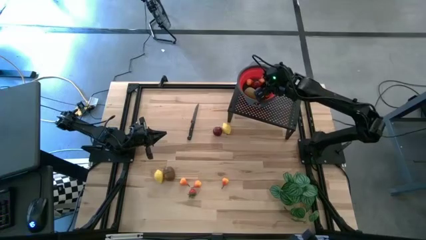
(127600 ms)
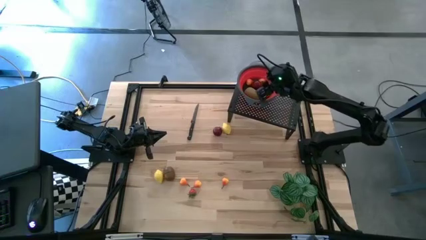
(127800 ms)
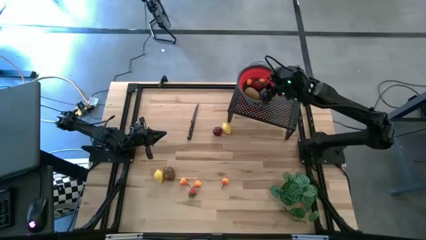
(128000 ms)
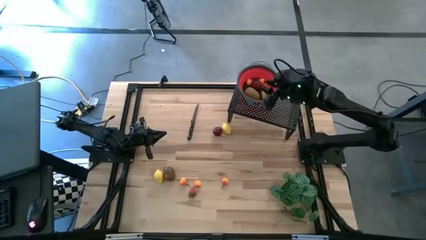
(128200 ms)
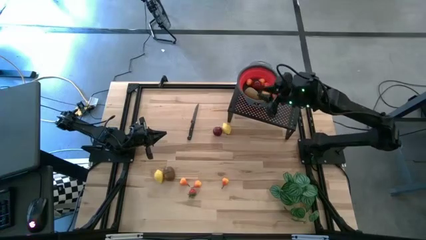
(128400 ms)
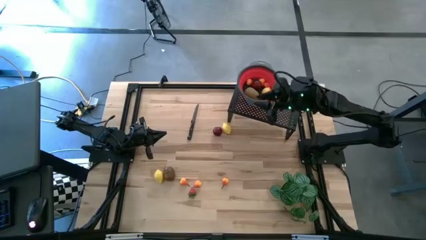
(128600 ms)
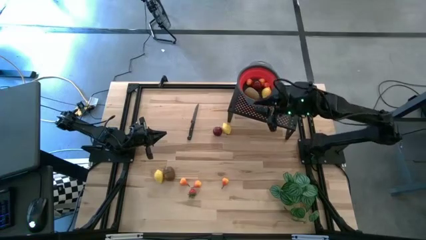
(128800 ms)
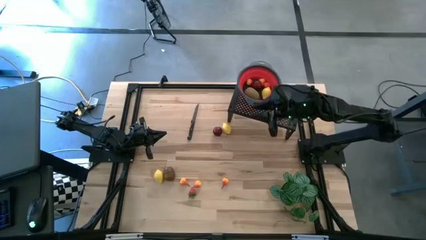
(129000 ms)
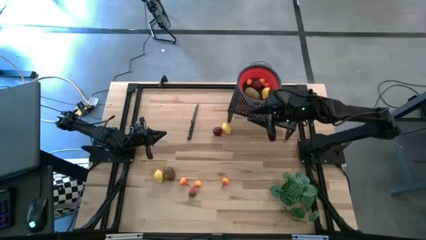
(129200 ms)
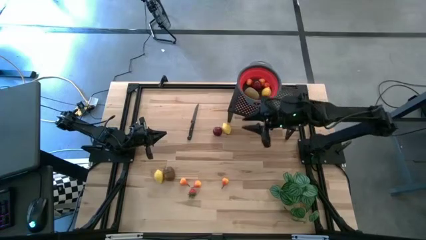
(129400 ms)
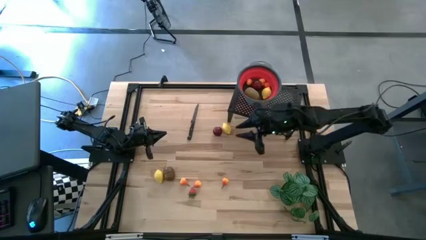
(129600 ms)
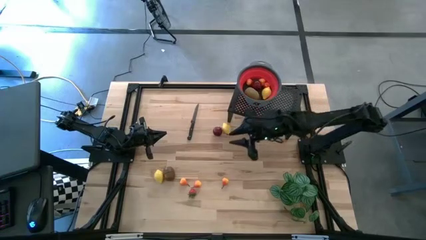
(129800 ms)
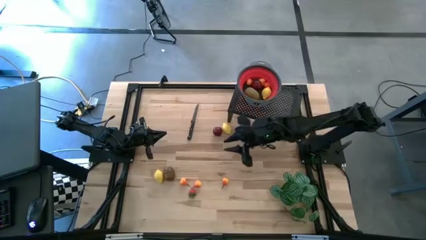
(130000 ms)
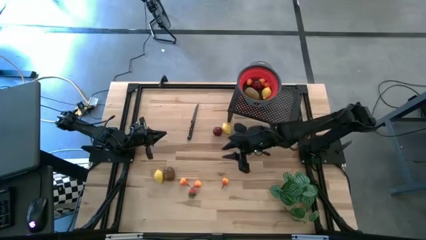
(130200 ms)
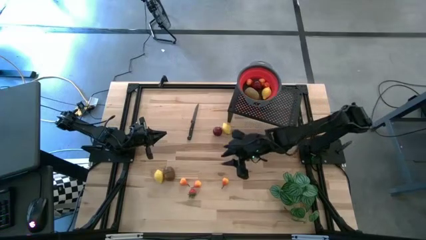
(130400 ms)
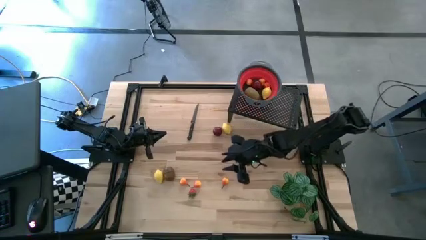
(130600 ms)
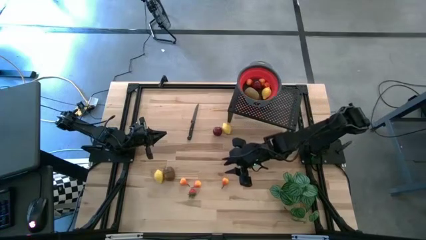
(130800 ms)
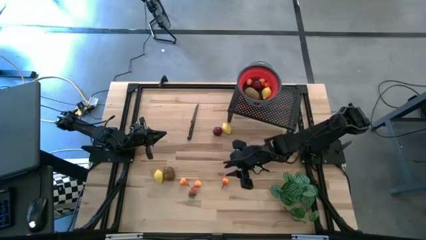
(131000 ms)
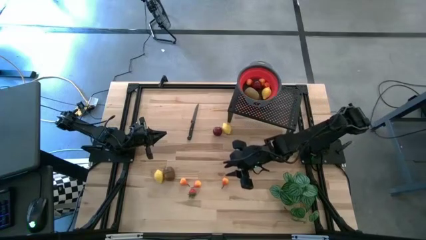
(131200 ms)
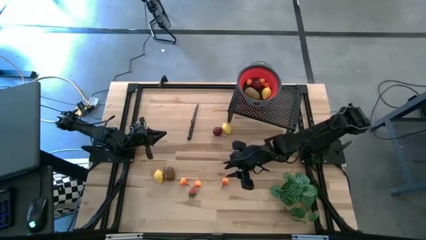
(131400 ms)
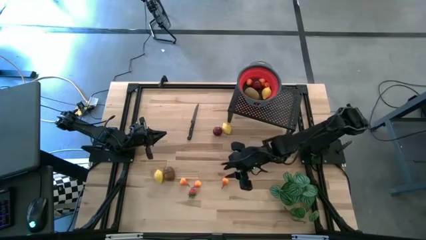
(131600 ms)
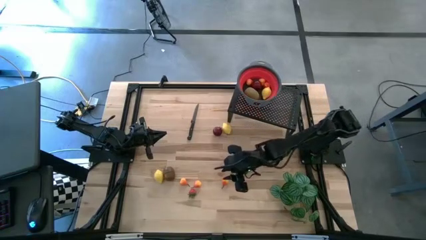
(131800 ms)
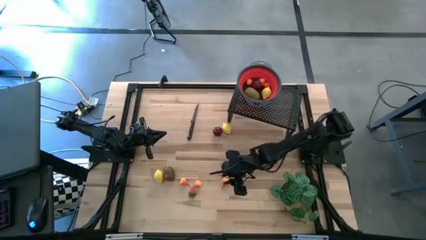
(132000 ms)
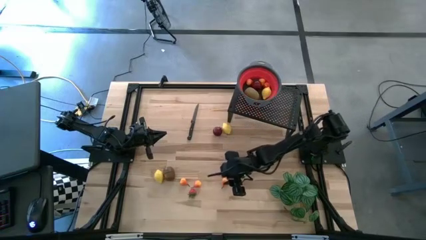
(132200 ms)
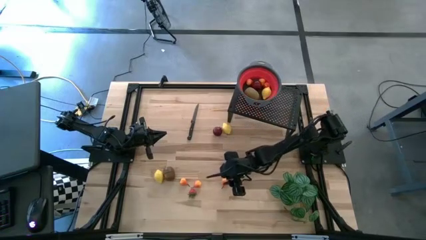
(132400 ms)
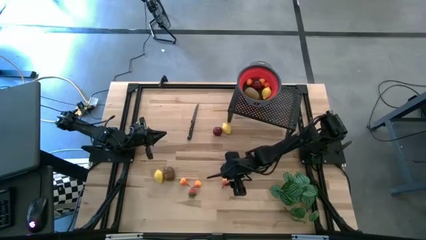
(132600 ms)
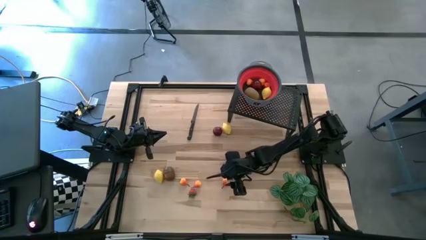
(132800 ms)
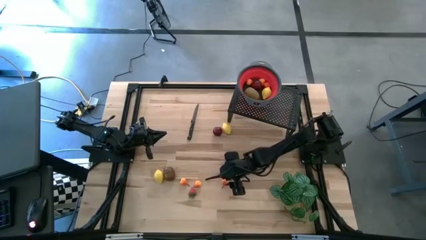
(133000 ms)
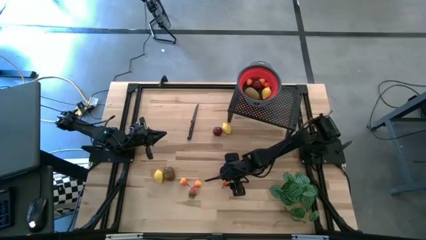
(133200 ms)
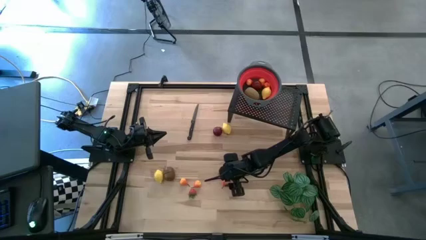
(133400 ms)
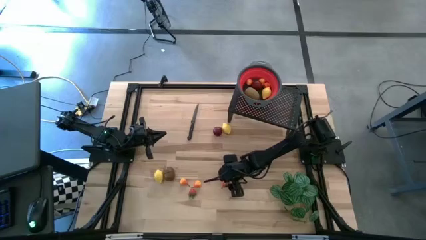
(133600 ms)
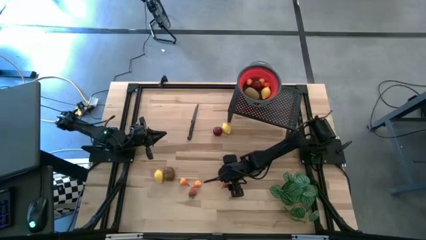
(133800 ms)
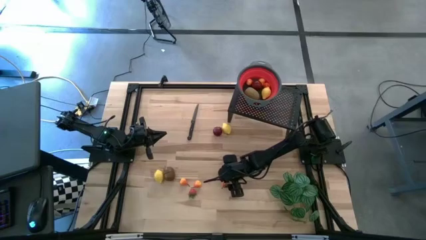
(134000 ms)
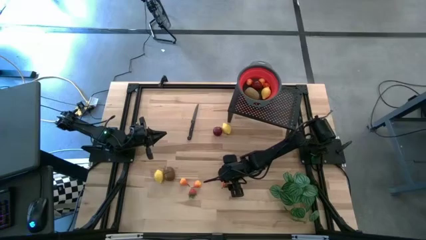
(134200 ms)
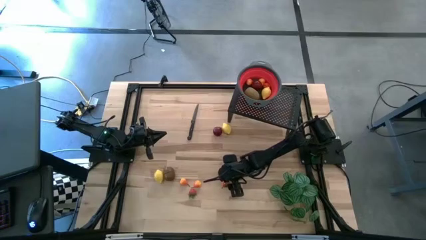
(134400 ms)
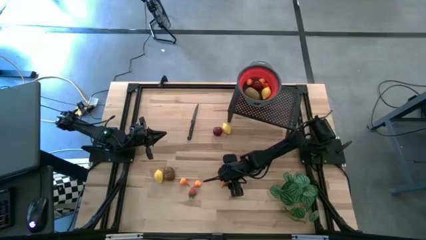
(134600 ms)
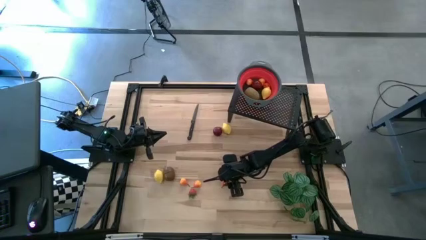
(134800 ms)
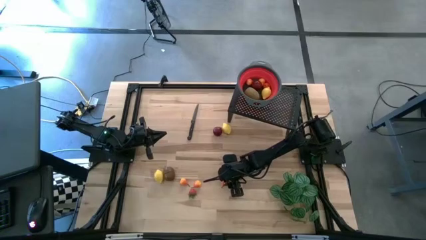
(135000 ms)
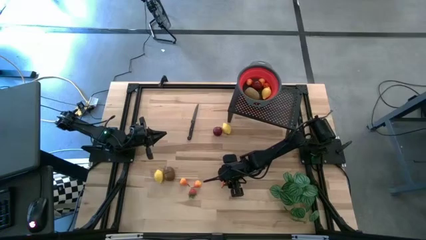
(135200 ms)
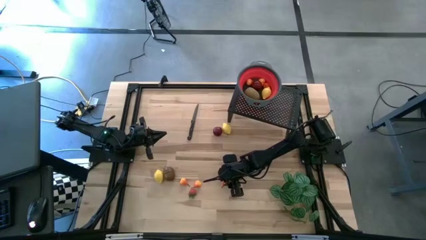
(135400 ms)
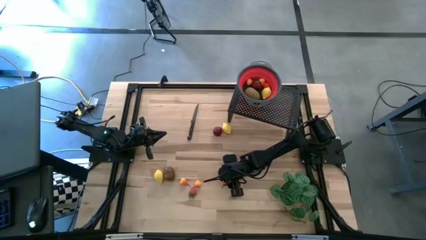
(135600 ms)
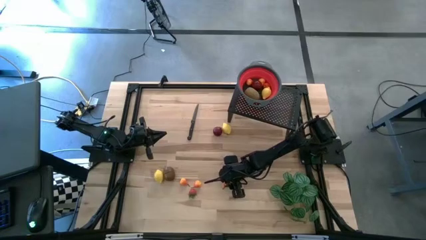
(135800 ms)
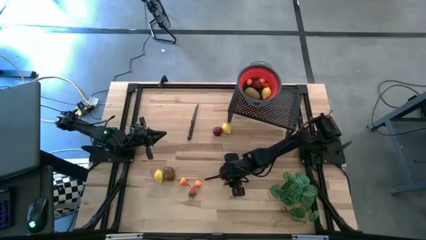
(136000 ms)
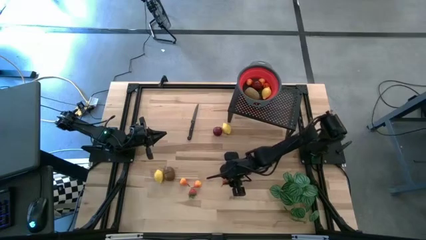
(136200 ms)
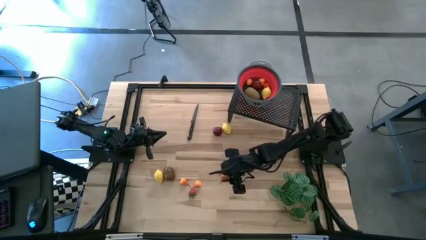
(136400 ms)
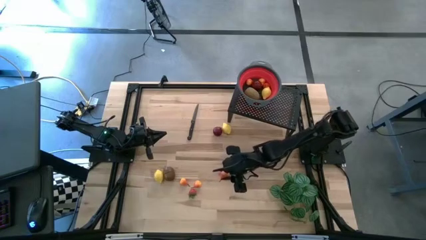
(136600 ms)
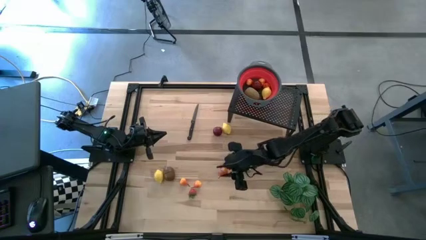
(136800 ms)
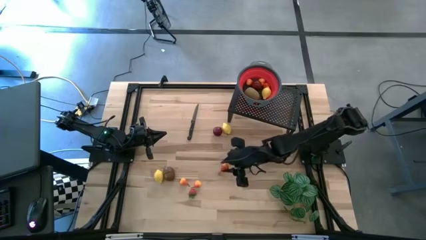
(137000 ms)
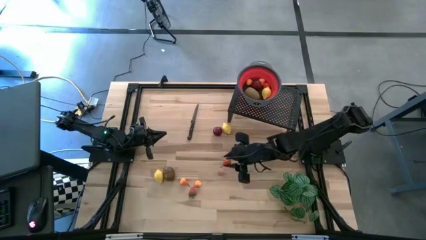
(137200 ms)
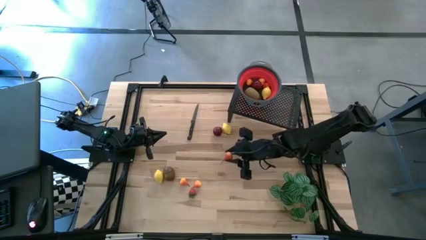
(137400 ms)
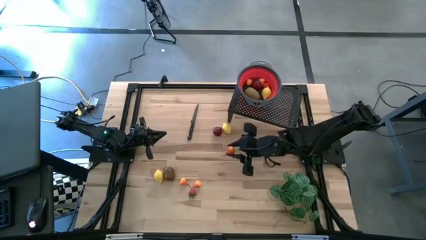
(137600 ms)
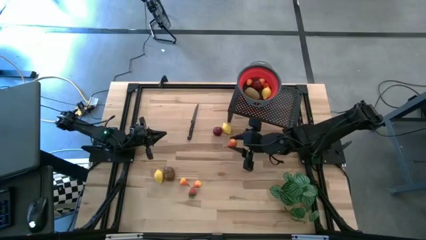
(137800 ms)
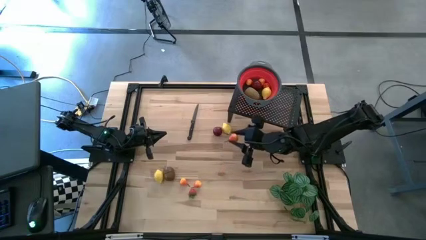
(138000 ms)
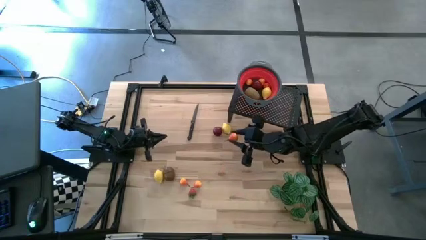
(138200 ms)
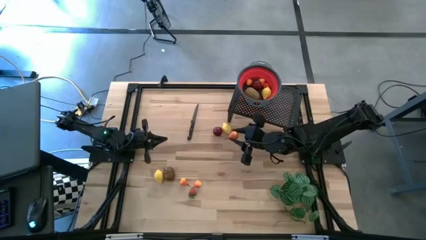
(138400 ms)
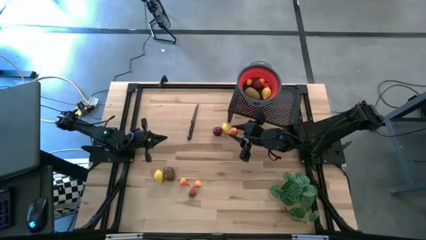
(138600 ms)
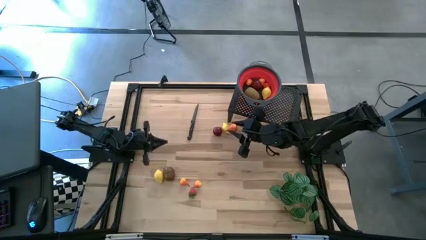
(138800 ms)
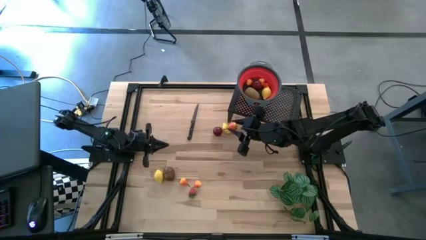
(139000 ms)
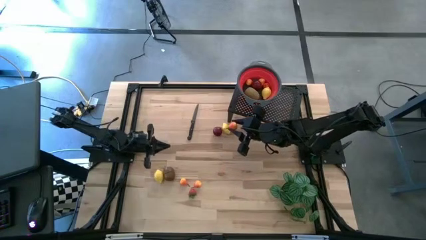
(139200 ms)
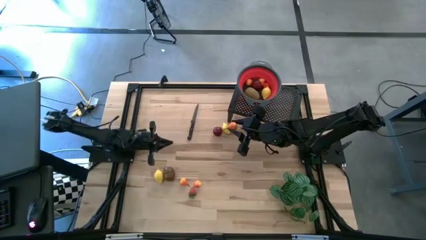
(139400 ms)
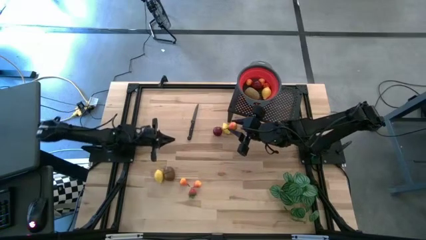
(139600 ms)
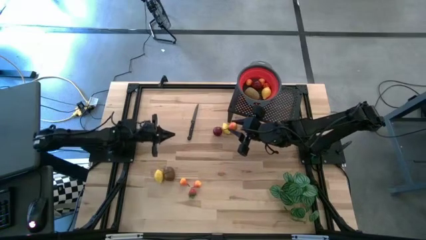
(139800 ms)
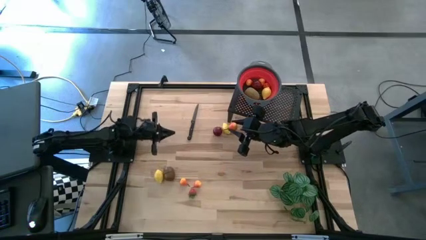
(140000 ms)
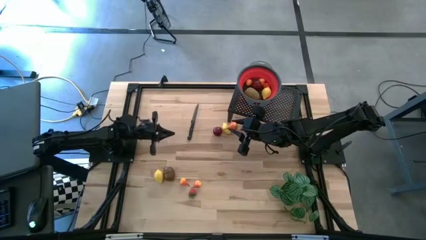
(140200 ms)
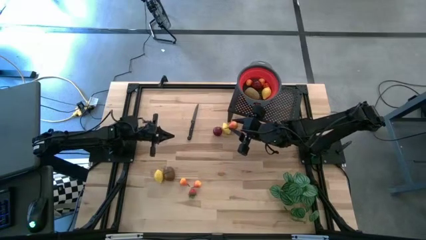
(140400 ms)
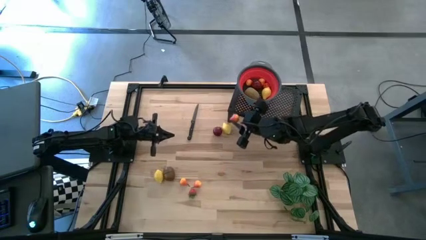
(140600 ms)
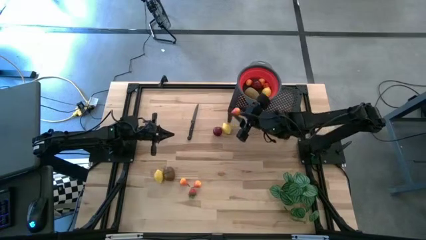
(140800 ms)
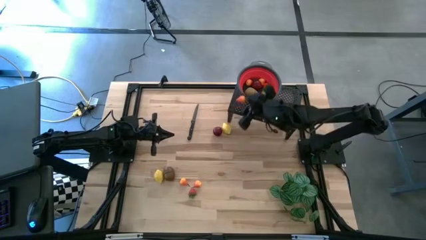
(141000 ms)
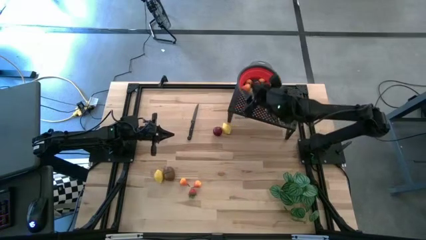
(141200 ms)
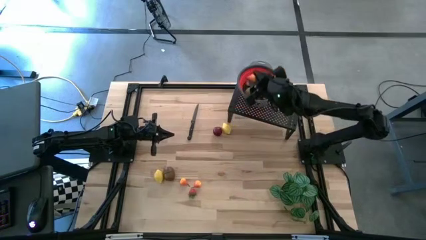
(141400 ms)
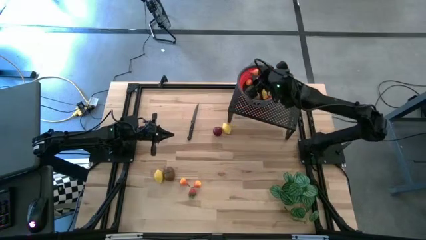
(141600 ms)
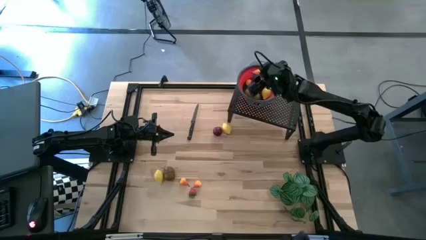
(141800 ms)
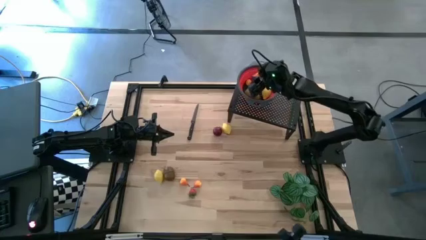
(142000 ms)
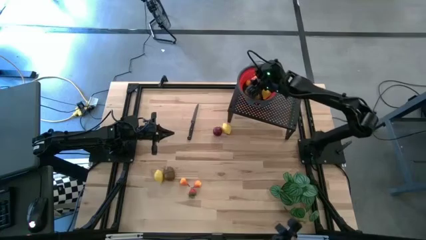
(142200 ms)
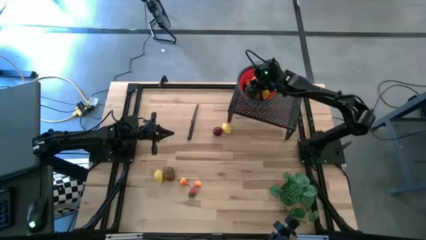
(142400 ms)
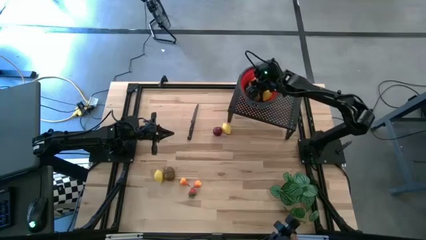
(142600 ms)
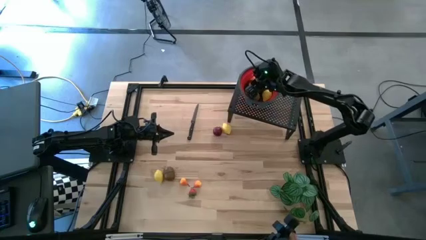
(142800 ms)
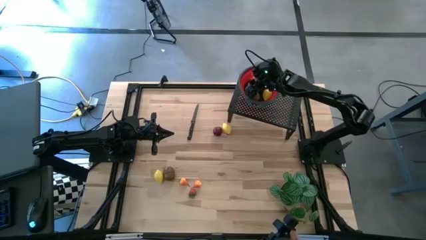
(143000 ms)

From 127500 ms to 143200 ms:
Task: Pick & Place Fruit
Put the orange pear into the red strainer bowl on the shelf

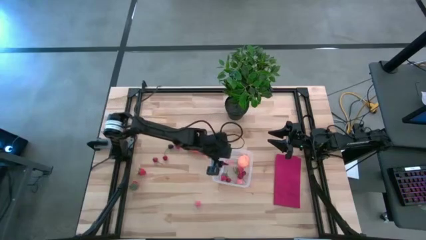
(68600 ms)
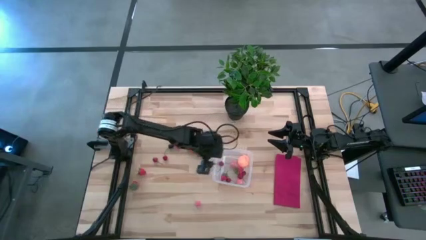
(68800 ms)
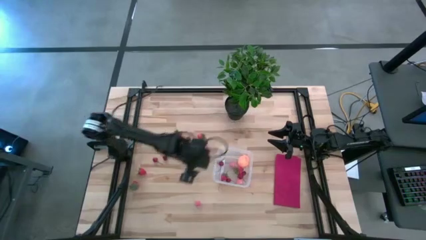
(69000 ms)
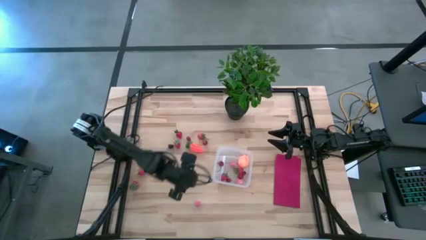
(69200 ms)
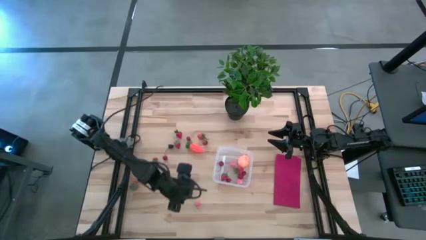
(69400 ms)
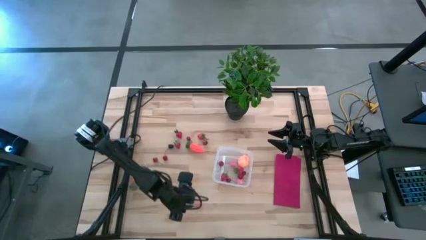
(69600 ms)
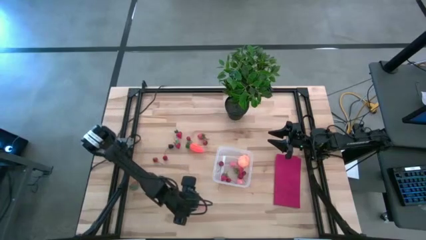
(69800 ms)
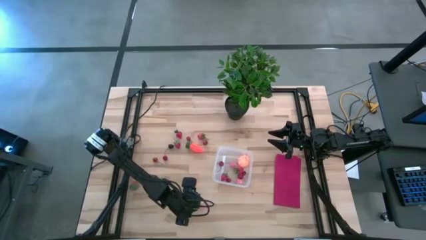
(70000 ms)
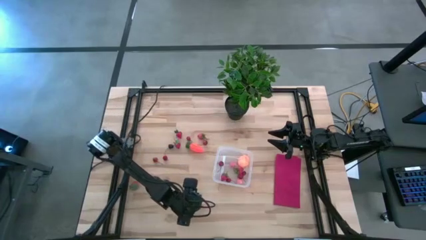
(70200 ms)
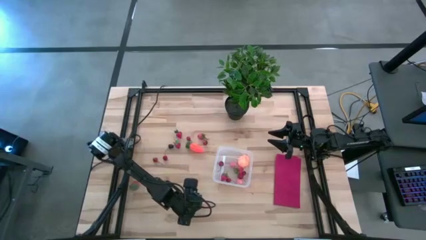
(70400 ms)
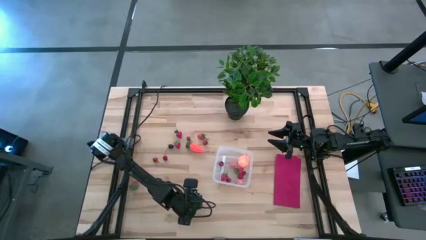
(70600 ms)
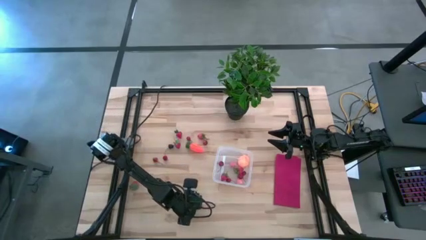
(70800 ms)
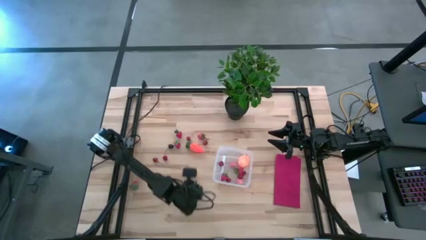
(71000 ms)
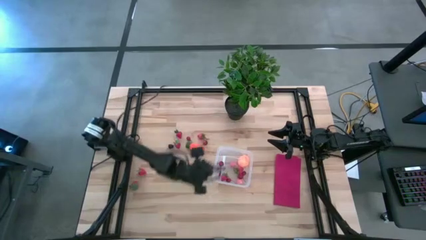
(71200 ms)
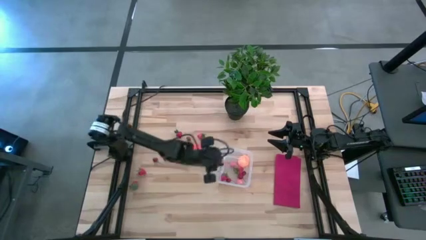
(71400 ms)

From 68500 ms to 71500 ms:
Task: Pick and placing Produce into tupperware
Put the pink peach into the transparent bin
